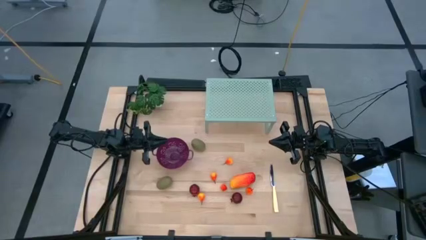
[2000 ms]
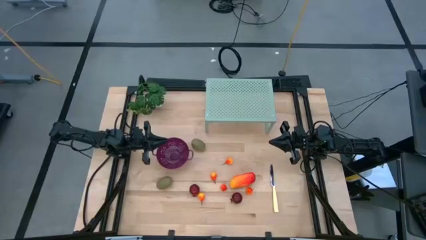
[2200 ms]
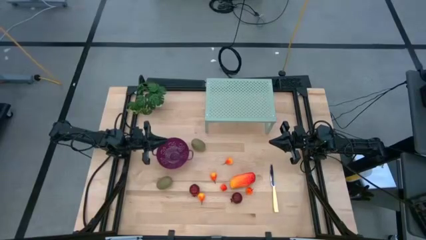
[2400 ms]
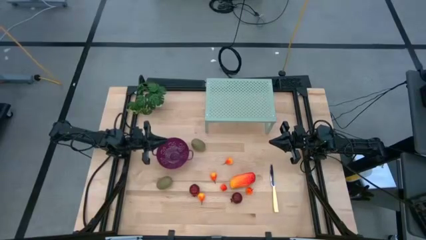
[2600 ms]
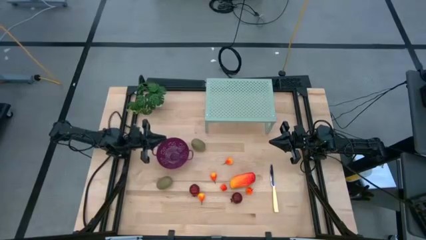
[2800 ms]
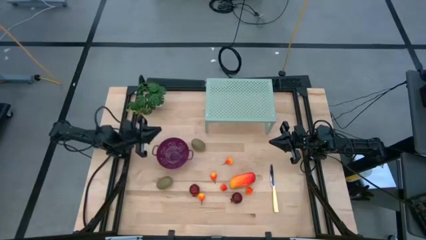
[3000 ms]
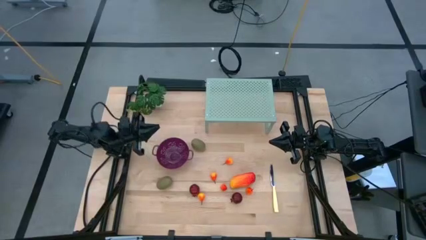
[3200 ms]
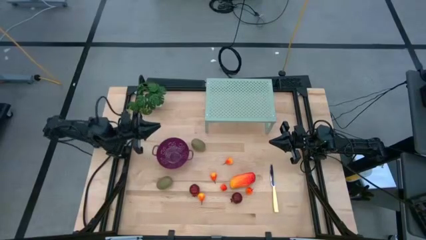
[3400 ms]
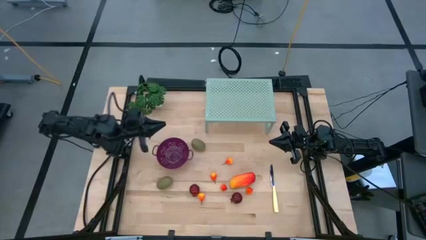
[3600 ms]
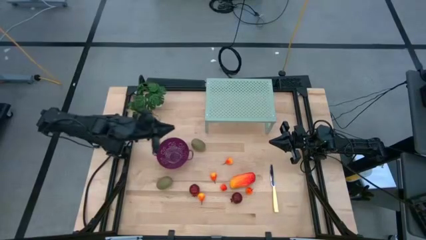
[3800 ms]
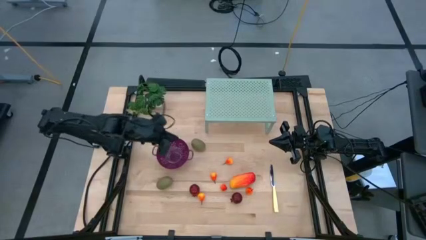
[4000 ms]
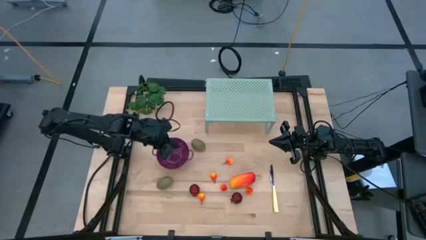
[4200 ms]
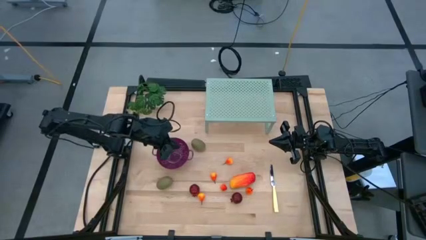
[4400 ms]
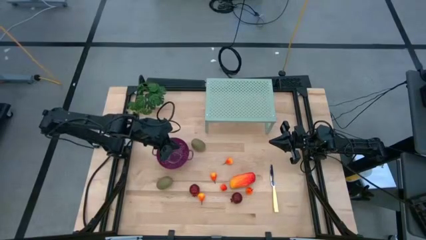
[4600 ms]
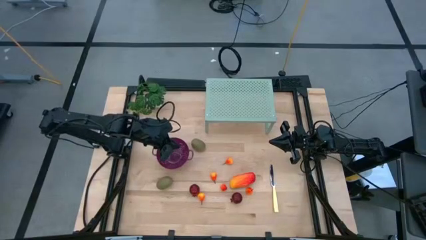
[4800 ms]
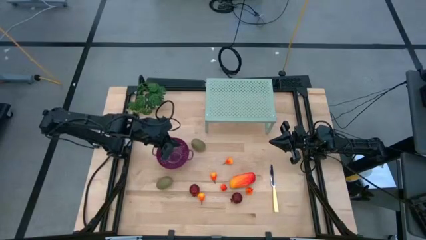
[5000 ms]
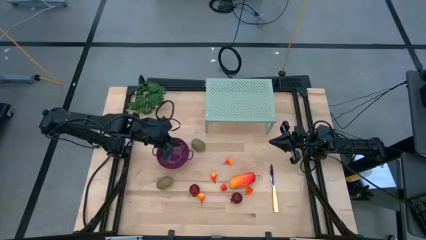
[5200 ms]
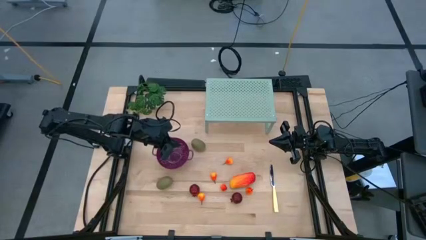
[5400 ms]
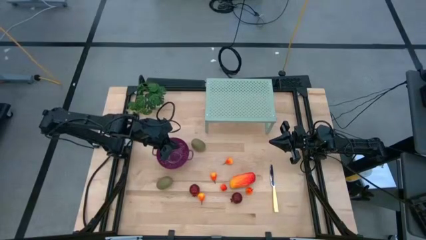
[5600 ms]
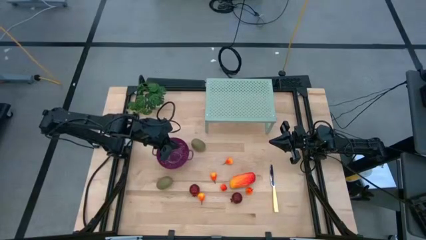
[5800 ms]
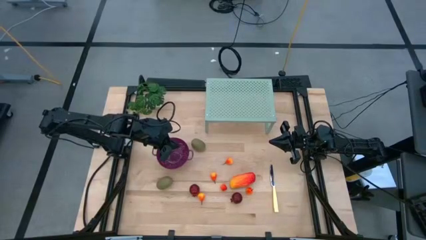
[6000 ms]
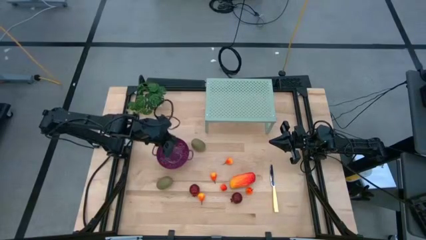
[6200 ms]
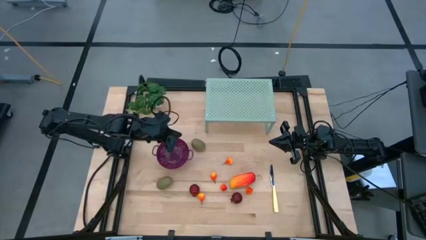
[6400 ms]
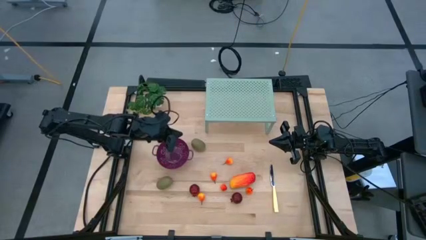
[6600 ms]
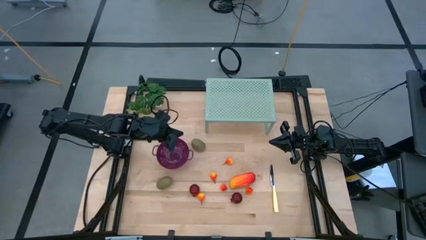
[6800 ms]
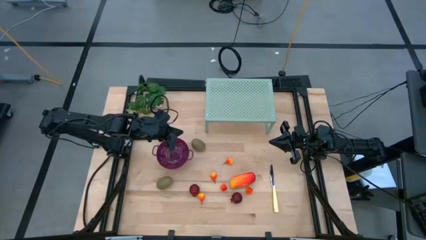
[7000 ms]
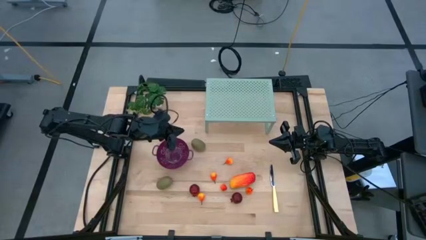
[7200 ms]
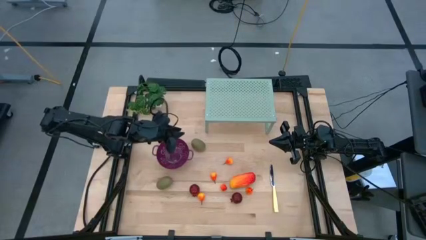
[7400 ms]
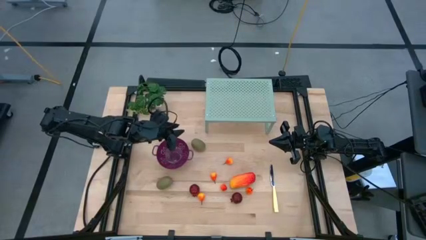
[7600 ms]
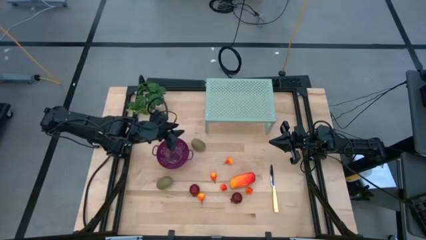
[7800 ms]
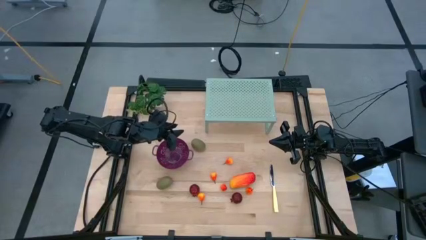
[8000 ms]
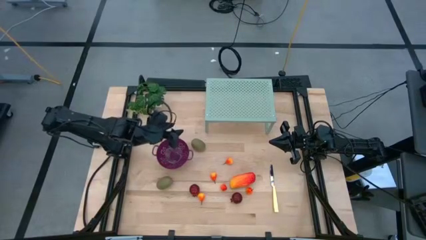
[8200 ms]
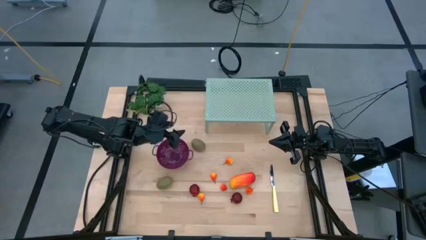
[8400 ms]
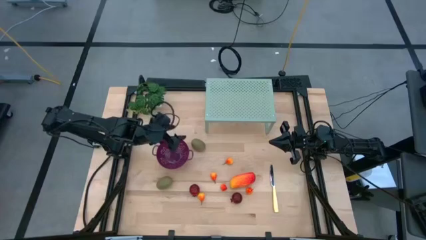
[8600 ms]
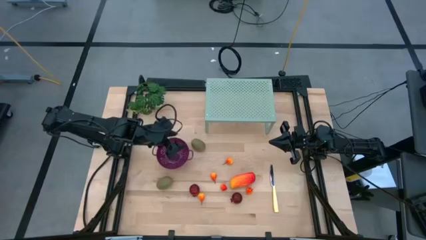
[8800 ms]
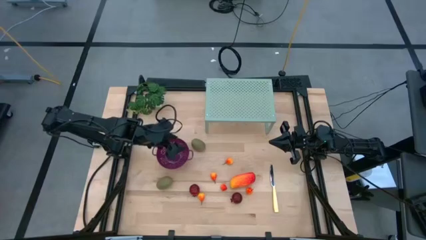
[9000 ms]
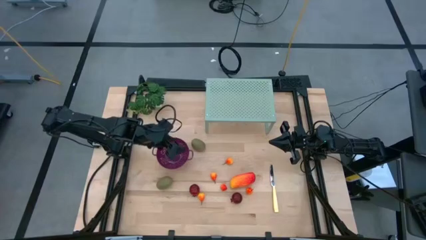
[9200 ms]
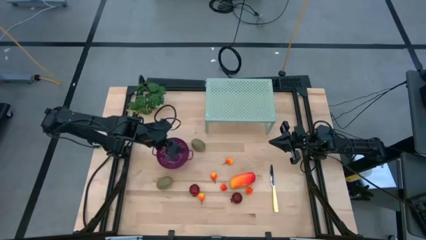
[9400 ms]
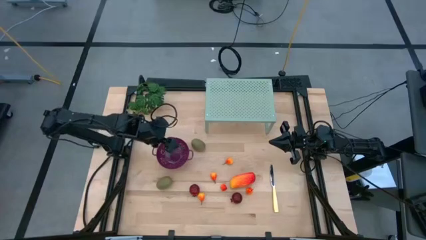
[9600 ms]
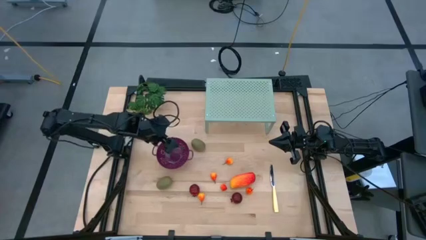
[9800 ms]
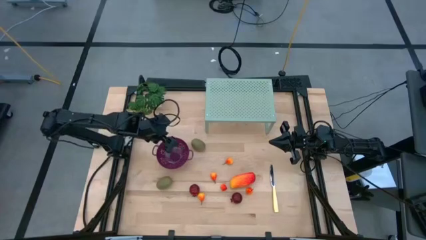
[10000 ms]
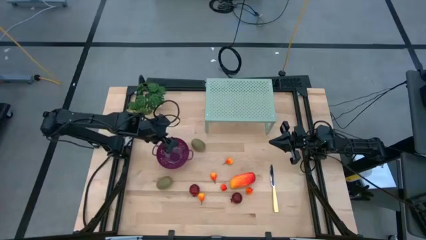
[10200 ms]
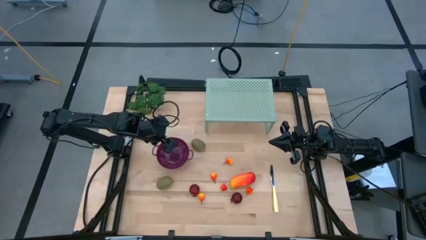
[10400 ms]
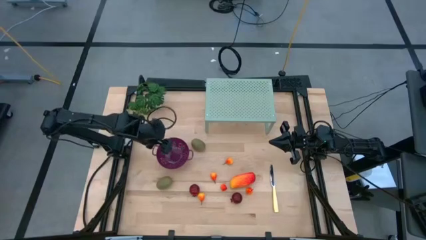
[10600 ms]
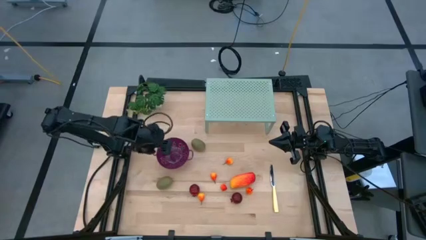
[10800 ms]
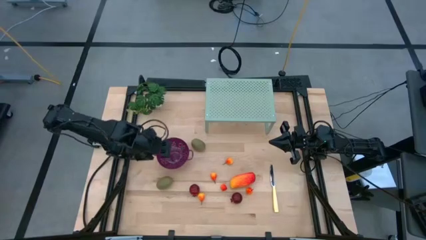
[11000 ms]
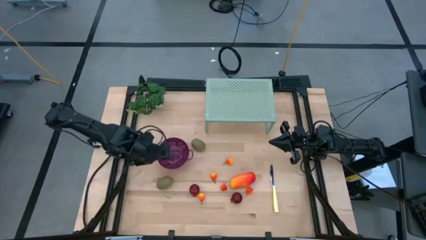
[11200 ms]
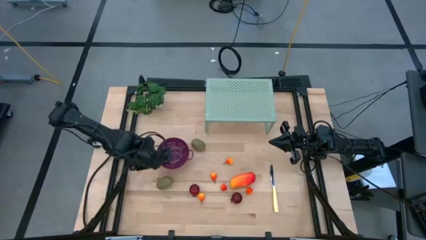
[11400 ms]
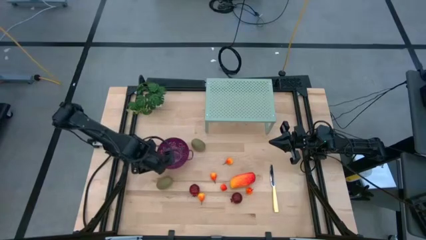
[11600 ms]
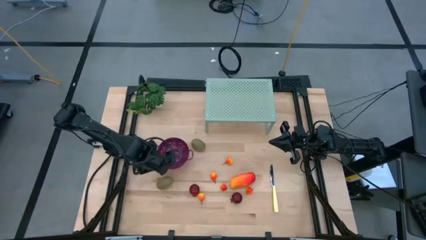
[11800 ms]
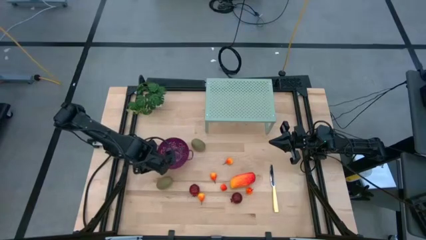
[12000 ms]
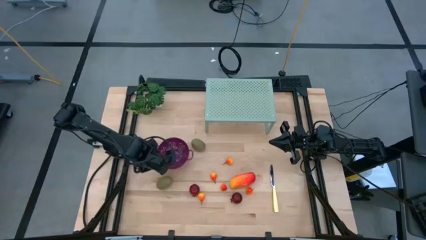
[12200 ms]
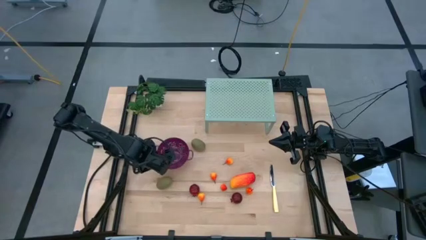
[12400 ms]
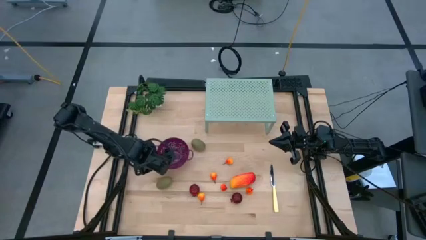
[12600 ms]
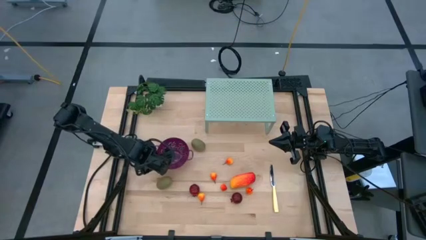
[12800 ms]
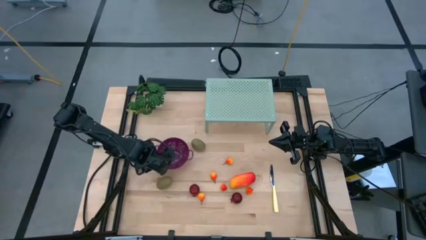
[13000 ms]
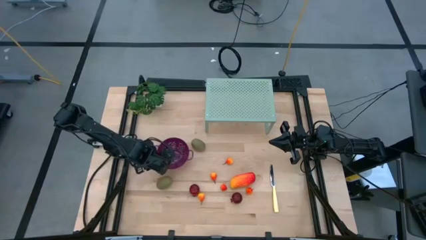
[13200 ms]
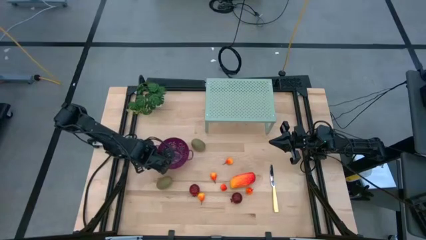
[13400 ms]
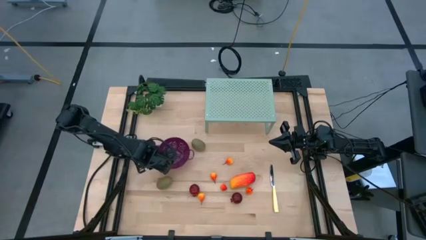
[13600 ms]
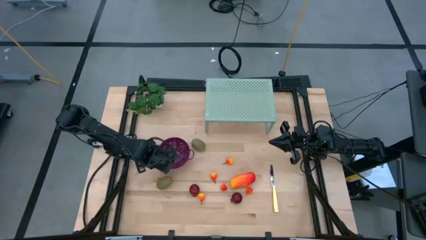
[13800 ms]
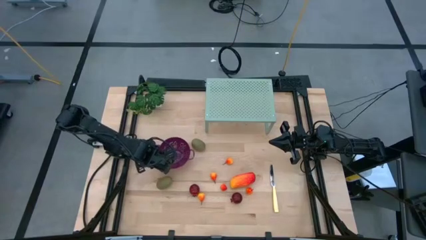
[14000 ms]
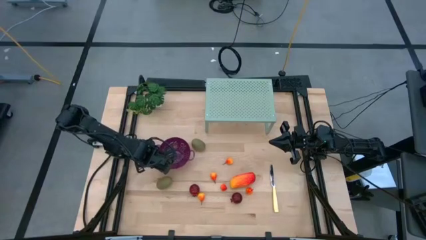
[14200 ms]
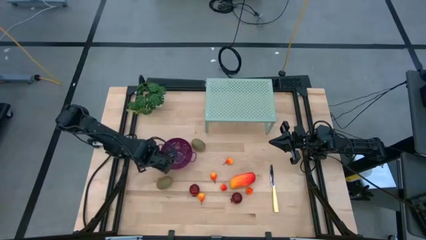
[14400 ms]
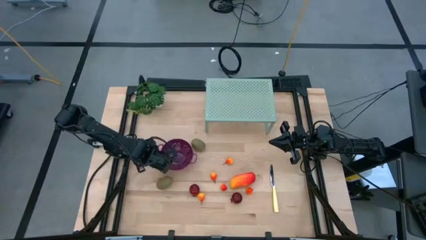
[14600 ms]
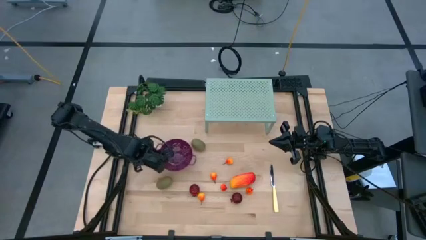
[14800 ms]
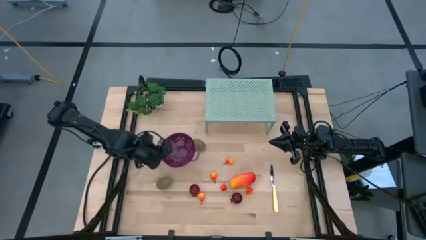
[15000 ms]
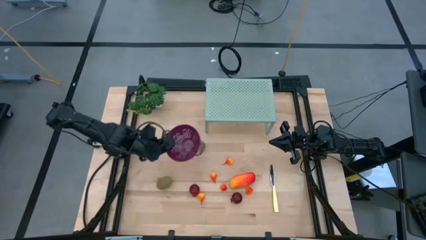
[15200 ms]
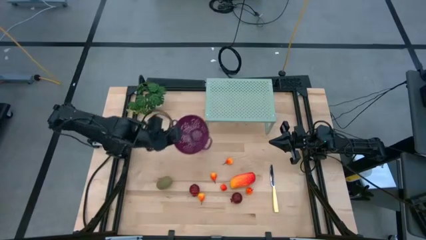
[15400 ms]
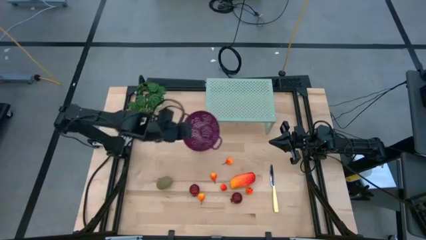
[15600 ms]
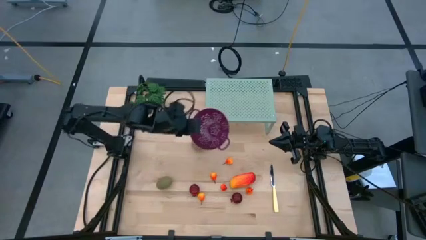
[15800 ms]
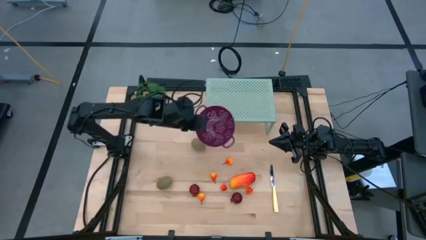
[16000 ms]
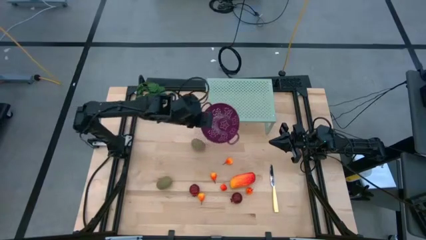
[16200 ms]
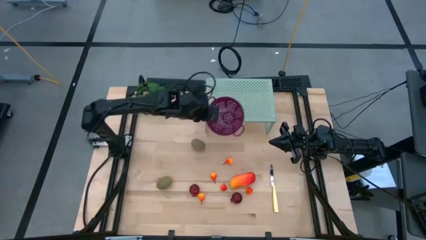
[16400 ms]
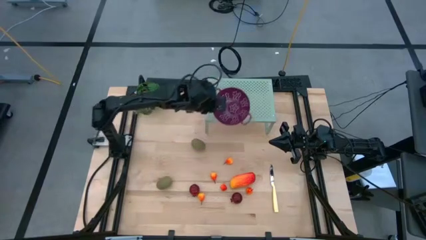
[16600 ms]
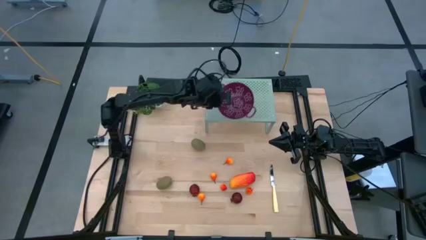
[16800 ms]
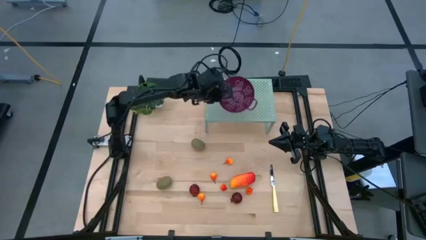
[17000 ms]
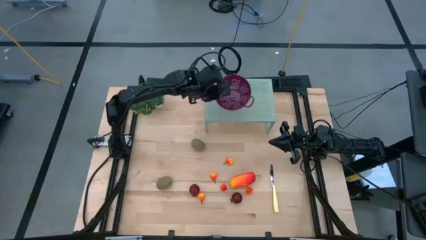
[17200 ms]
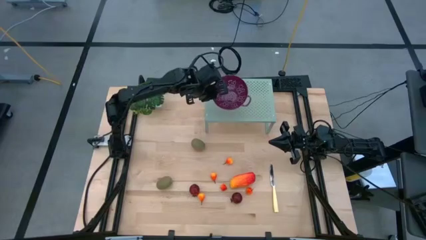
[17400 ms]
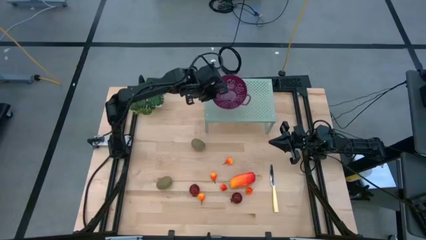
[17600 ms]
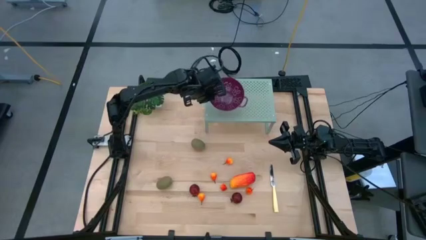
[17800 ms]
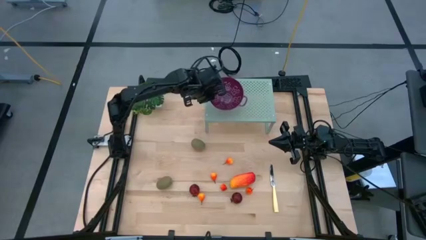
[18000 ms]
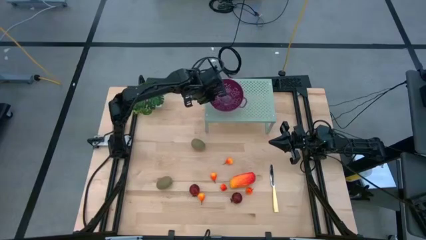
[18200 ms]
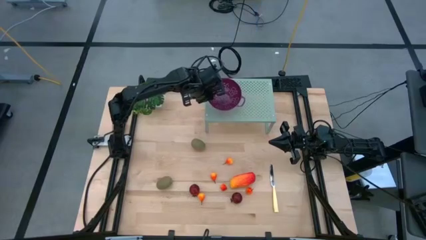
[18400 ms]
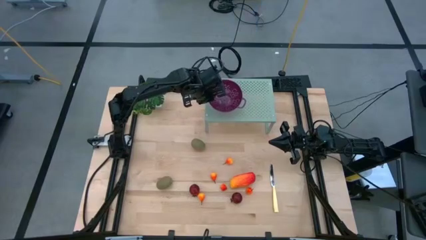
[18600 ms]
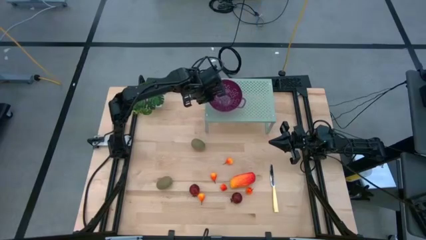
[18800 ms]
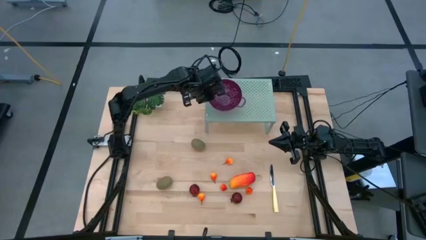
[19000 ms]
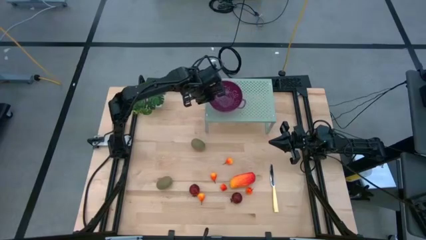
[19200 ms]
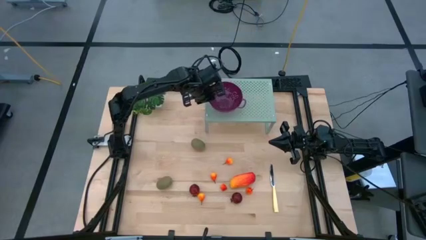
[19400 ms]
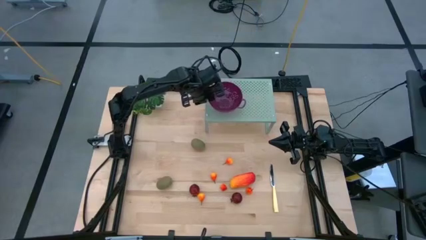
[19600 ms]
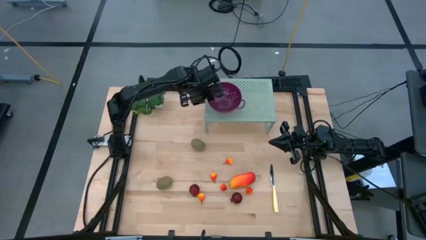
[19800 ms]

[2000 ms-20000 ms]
Task: Pick & Place Fruit
Put the strainer bowl on the shelf
